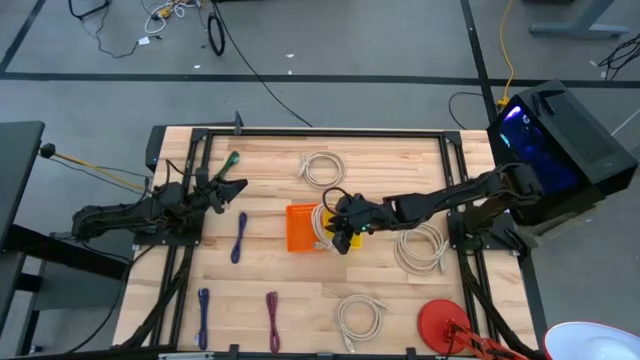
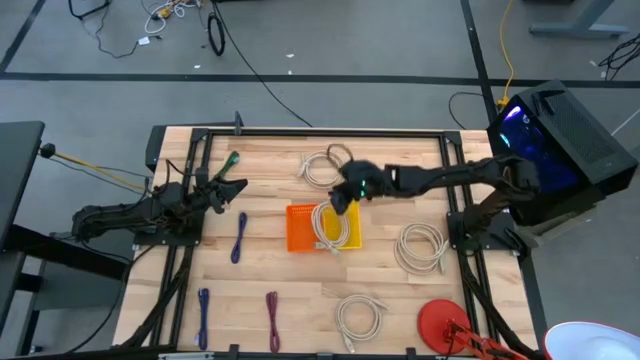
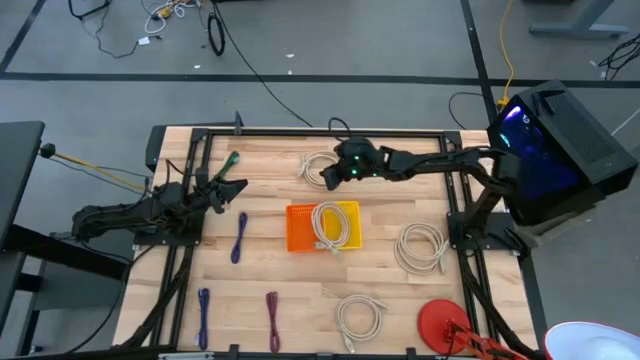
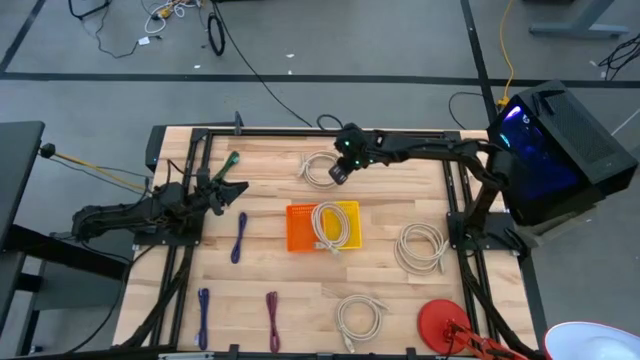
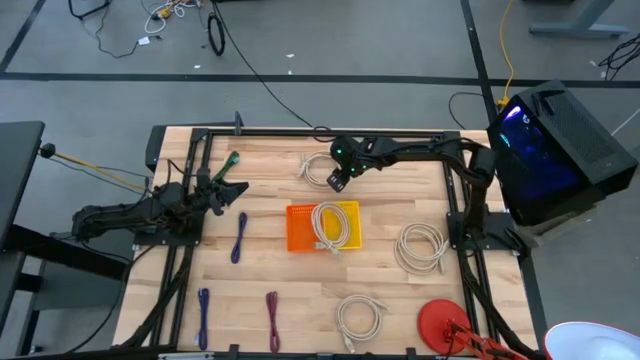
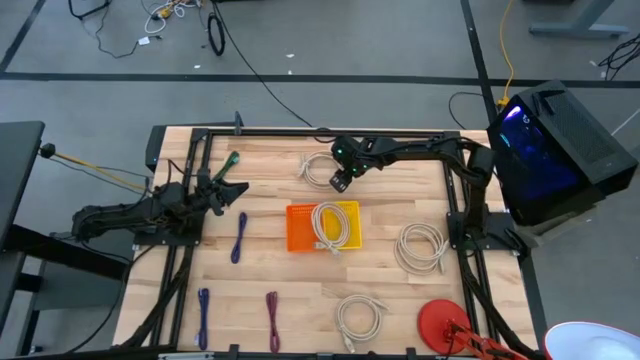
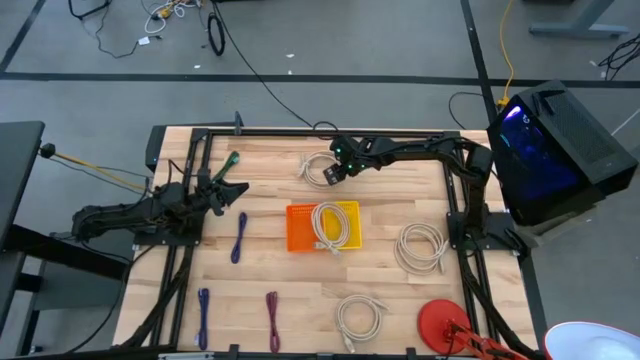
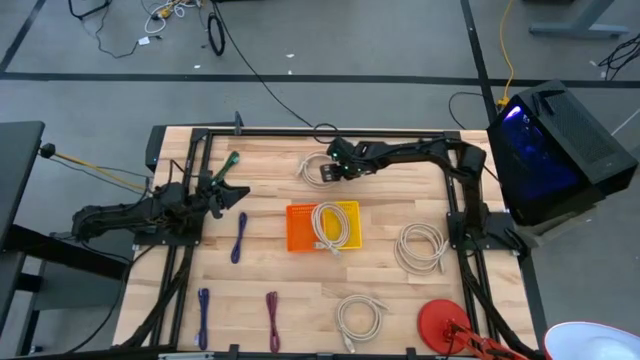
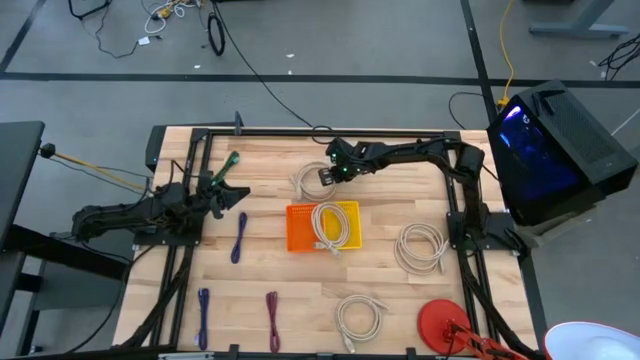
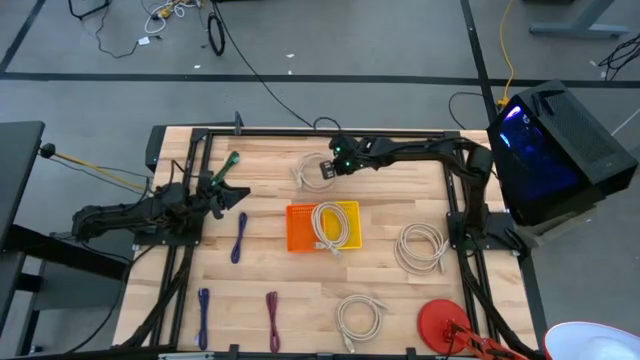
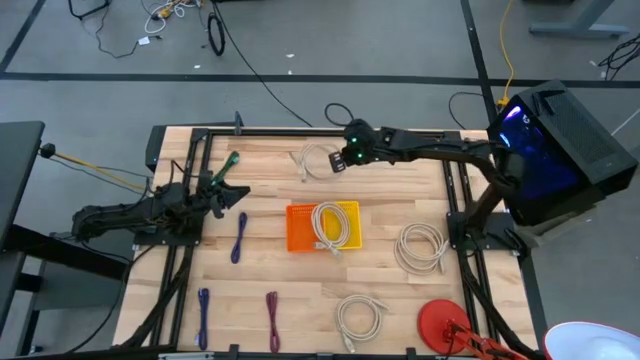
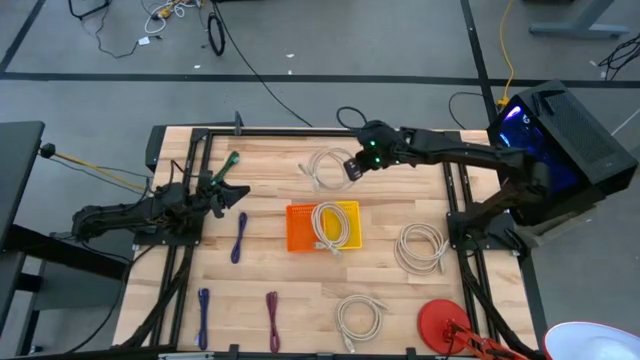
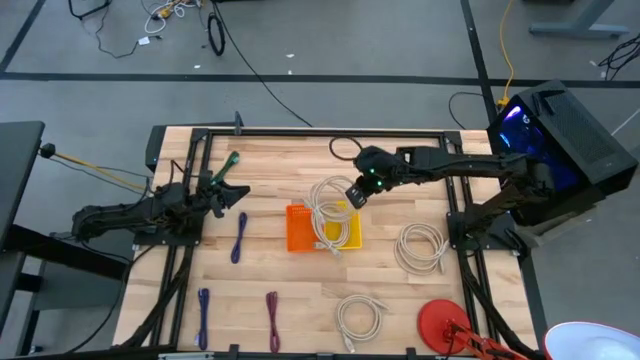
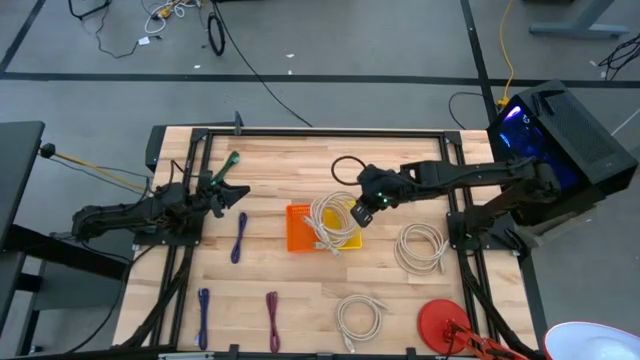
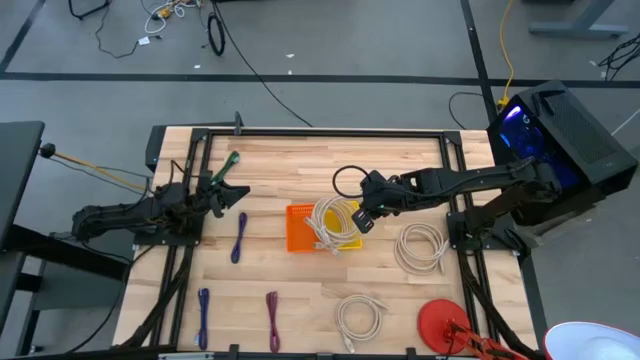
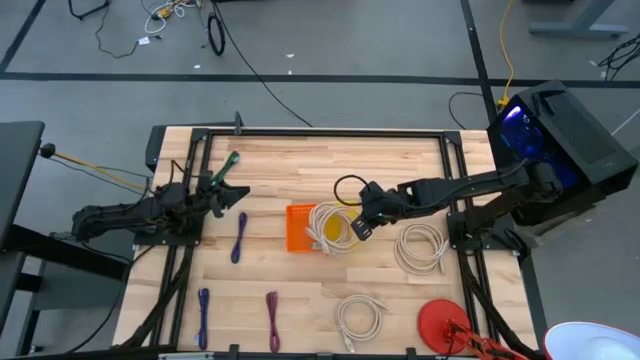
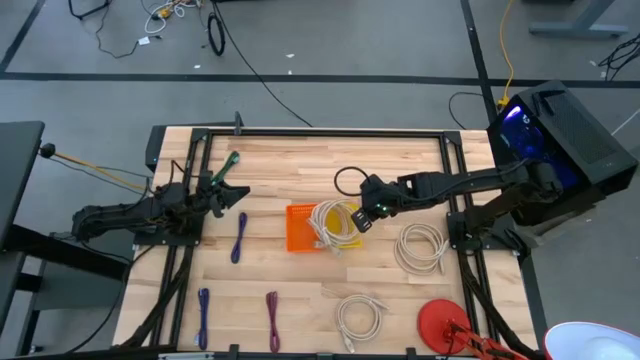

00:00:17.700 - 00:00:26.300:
Task: Pick & Place USB Port
Put the brown HDMI cable into the yellow bin

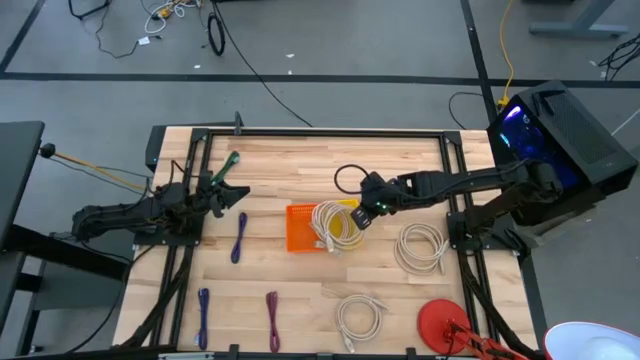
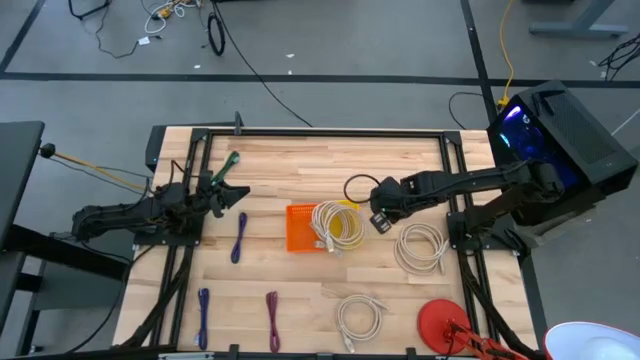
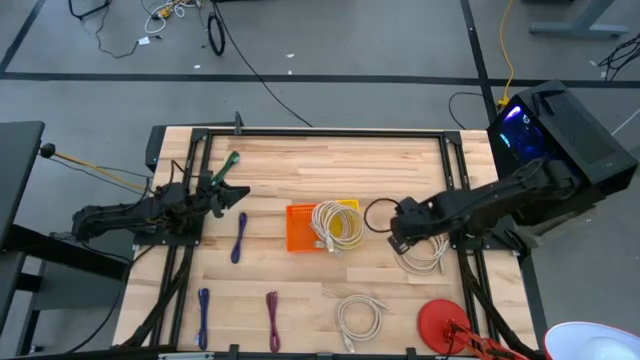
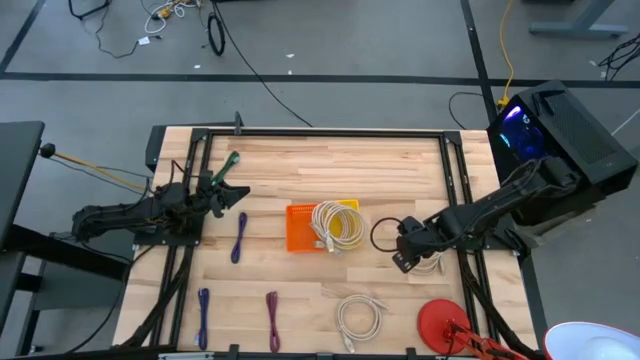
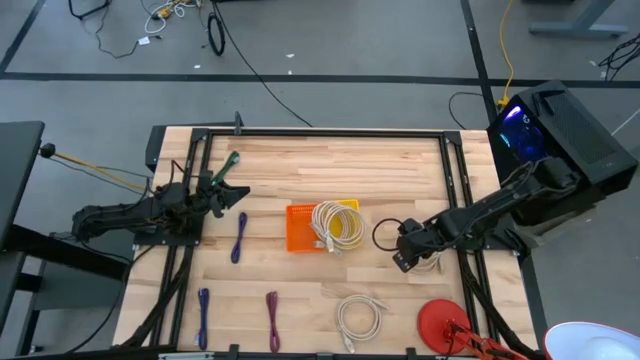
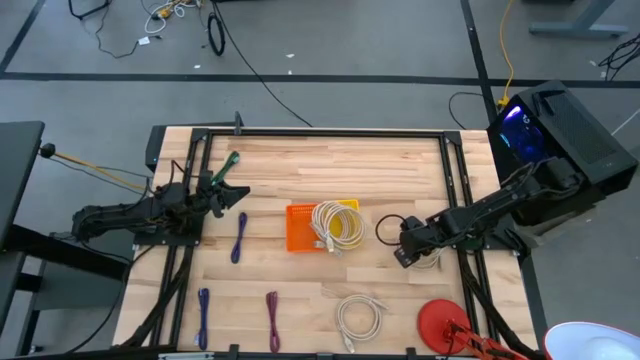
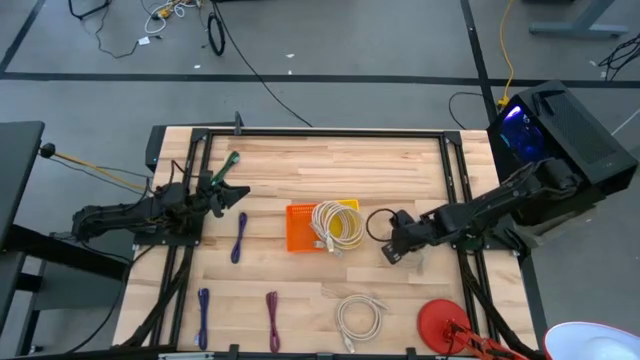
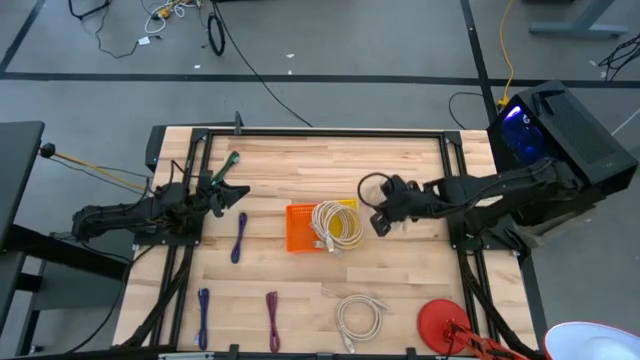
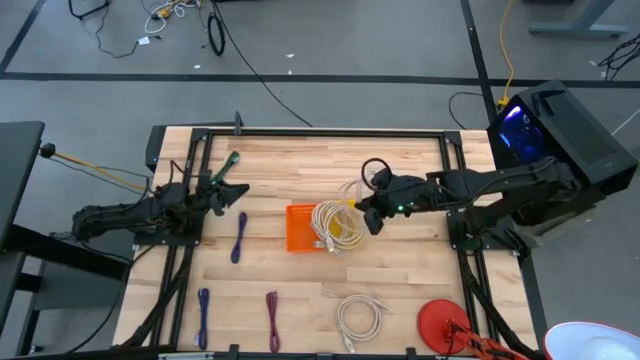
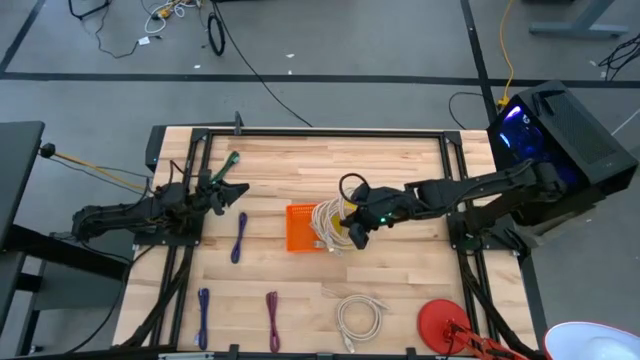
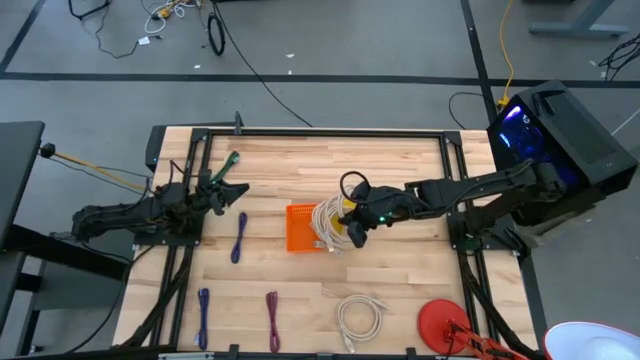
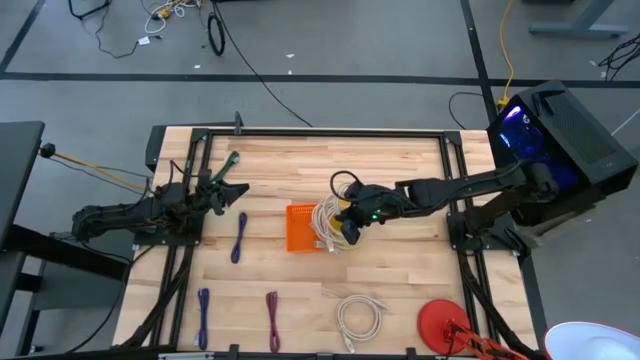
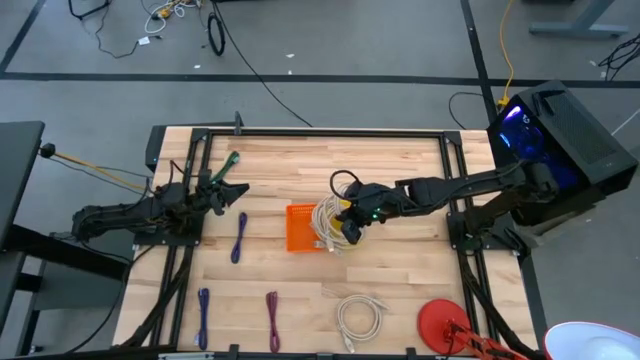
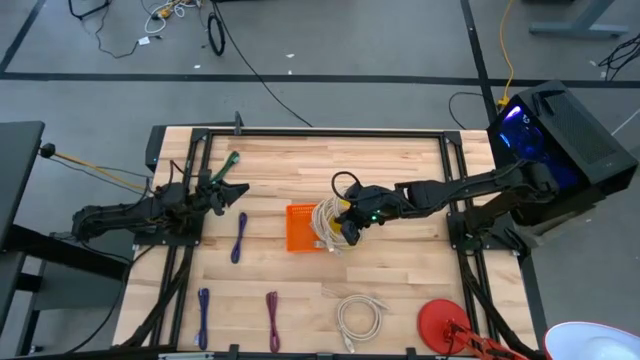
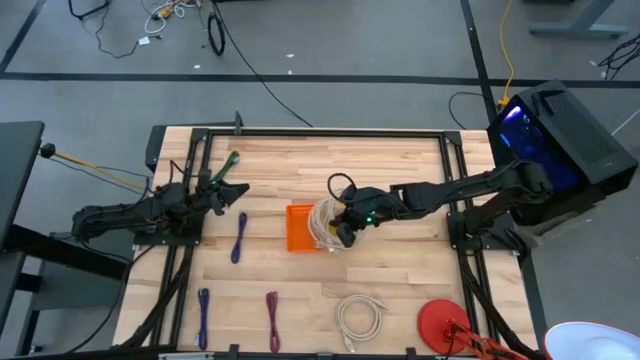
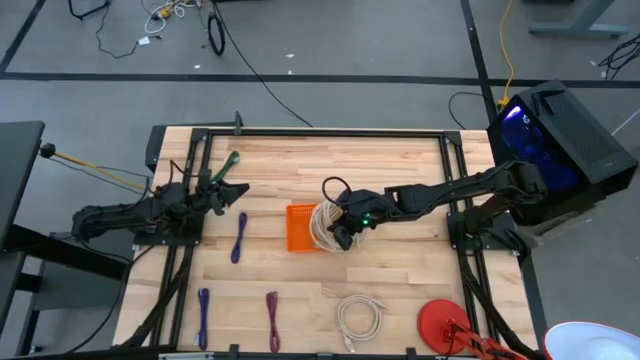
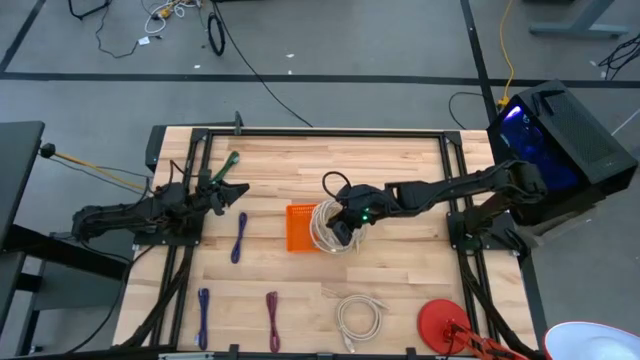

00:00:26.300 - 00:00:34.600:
Put the brown HDMI cable into the yellow bin

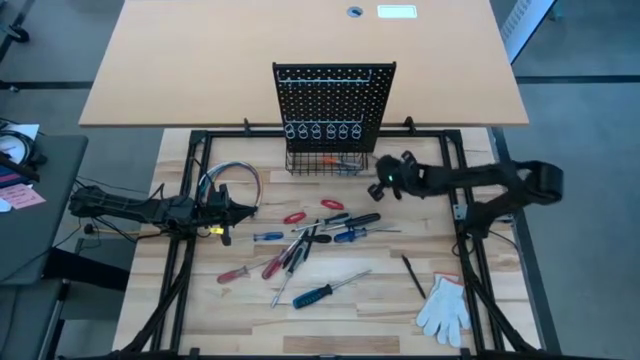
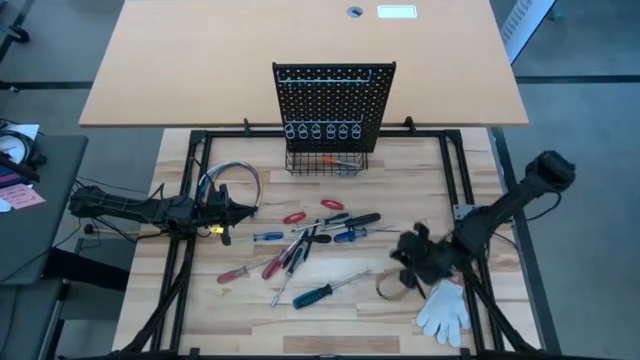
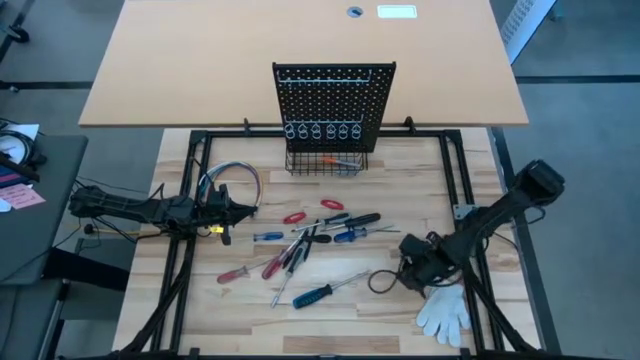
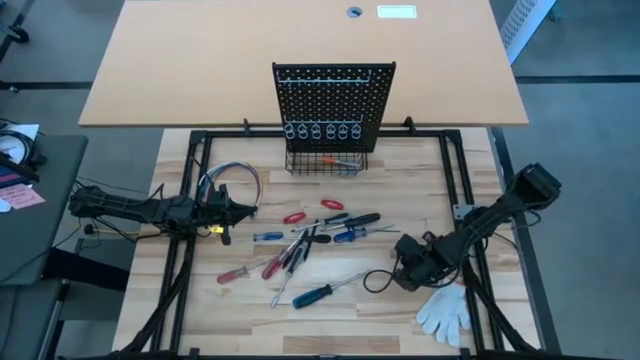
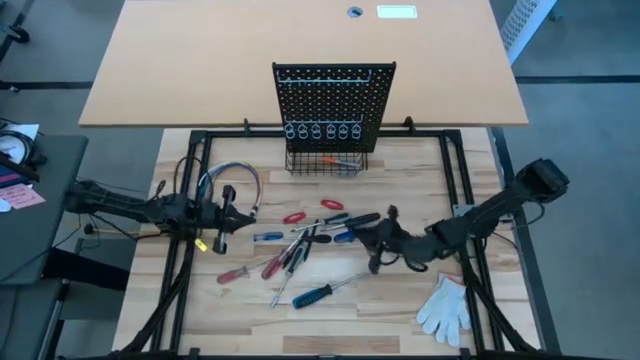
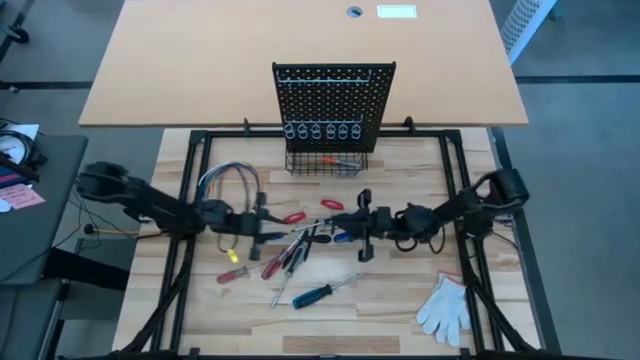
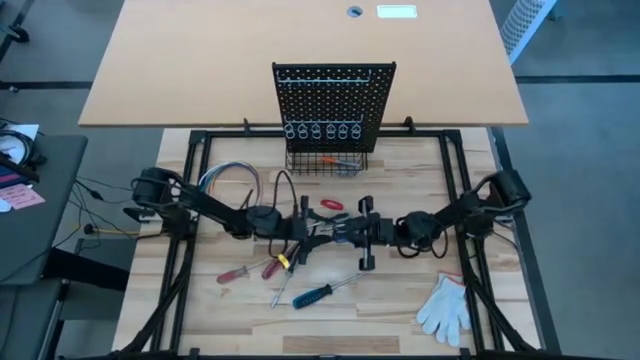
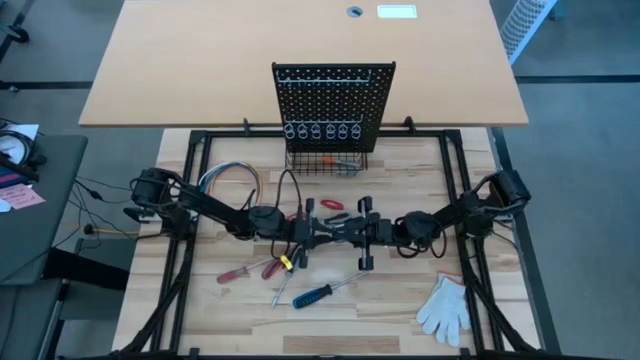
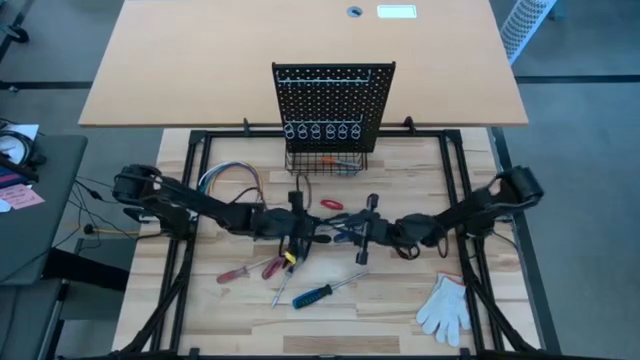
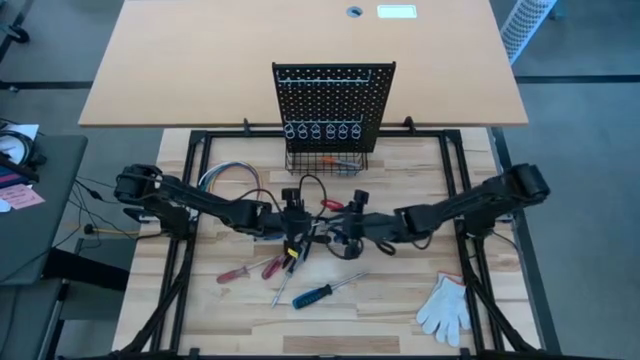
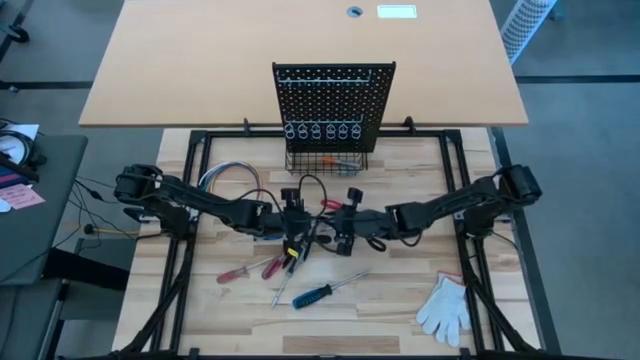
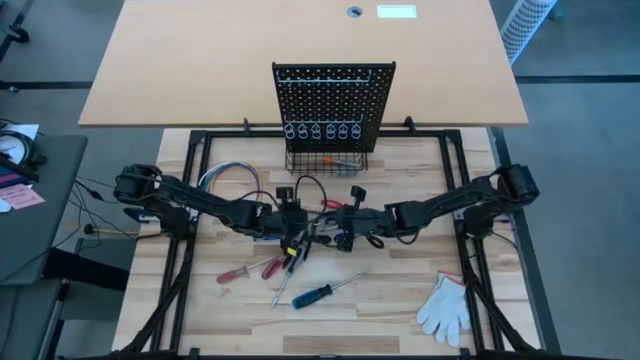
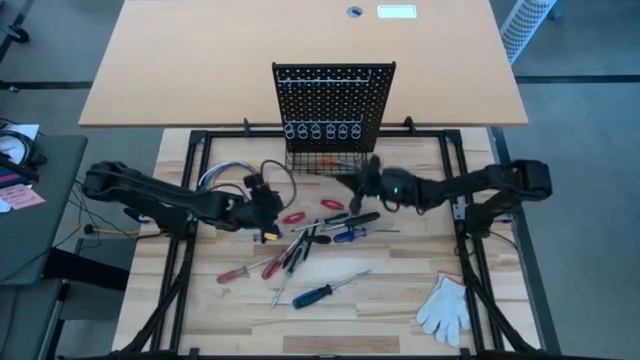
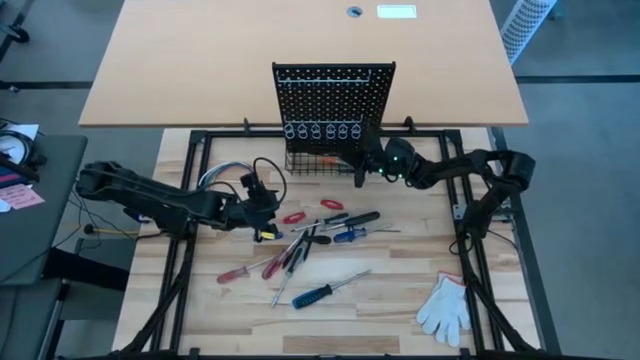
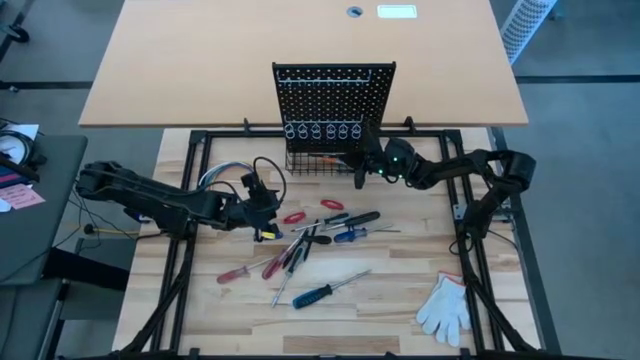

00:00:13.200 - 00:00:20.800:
Task: Hang tools onto peg board
Put the bottom black pen into the wire basket on the pegboard
